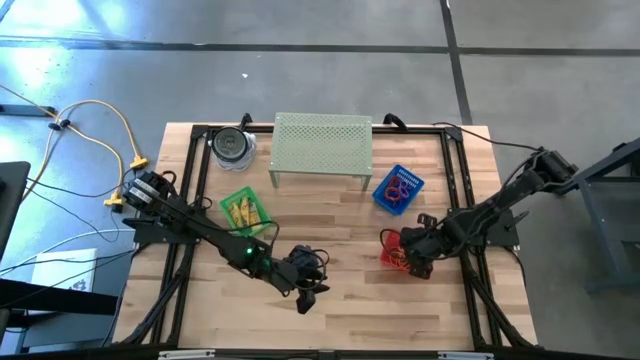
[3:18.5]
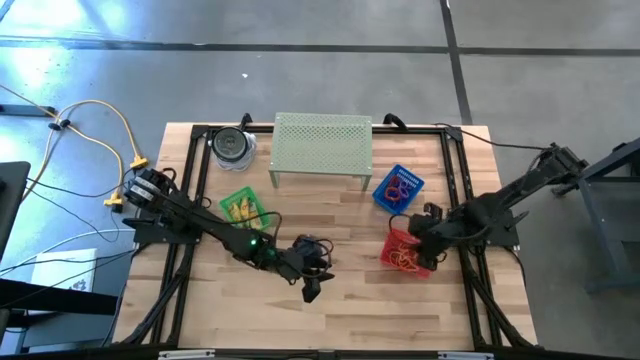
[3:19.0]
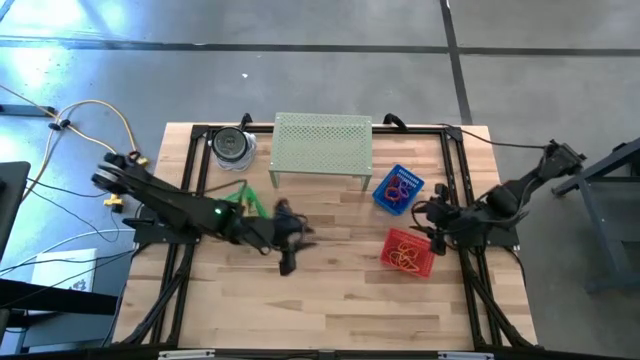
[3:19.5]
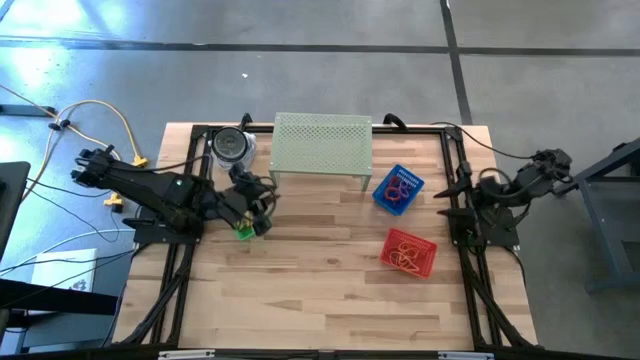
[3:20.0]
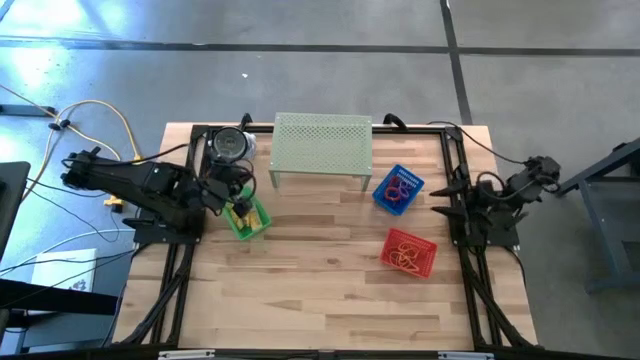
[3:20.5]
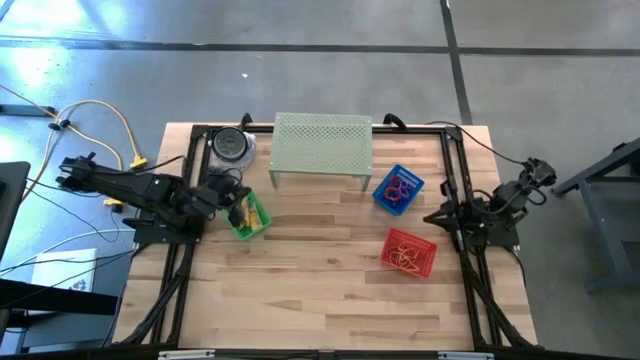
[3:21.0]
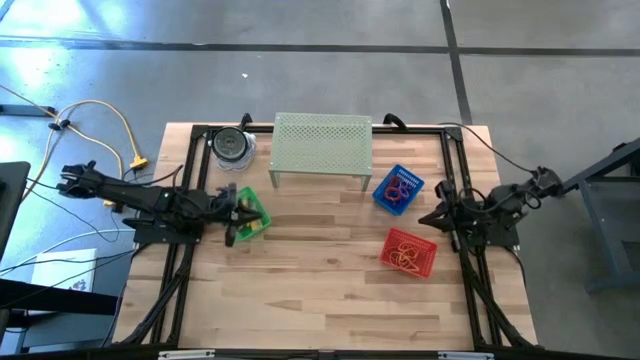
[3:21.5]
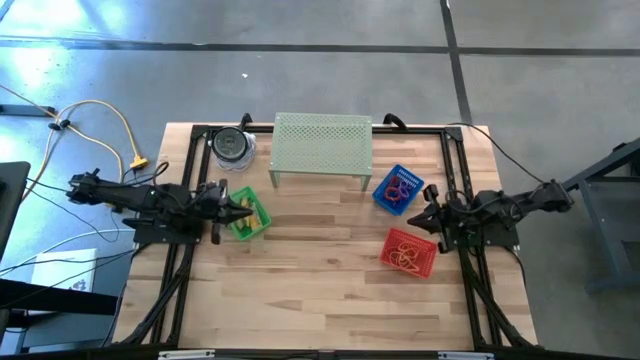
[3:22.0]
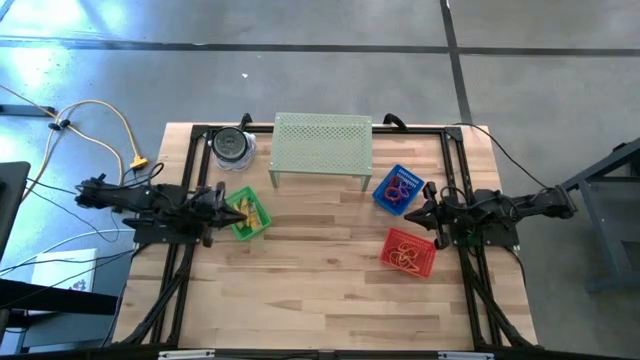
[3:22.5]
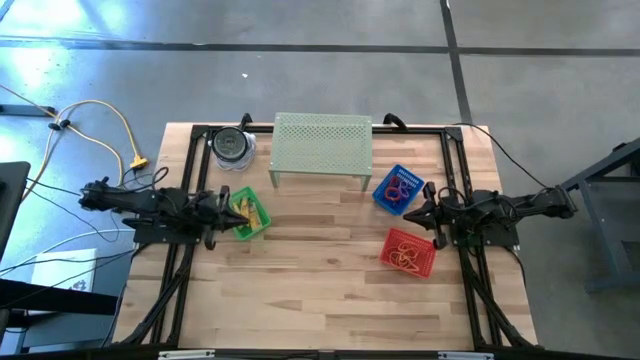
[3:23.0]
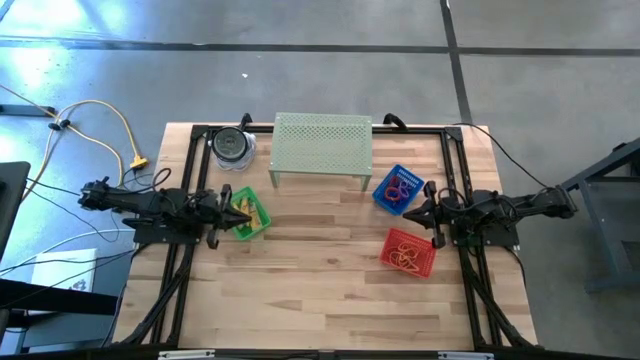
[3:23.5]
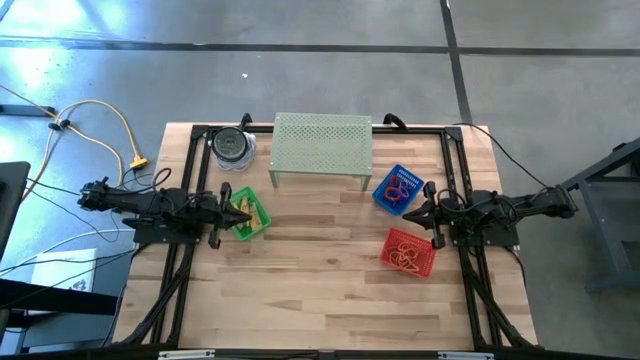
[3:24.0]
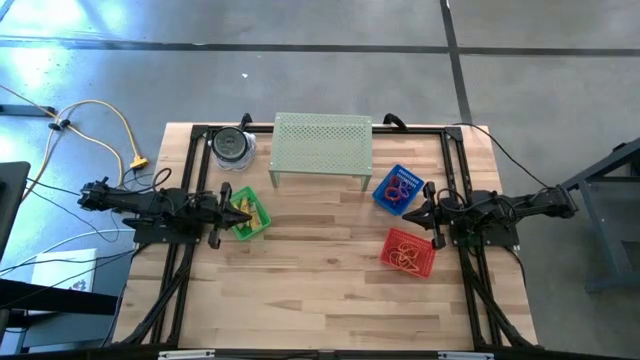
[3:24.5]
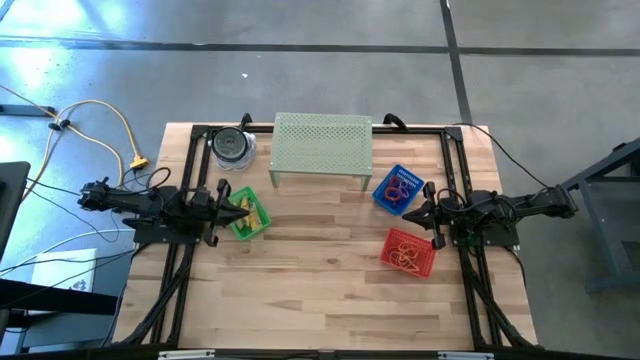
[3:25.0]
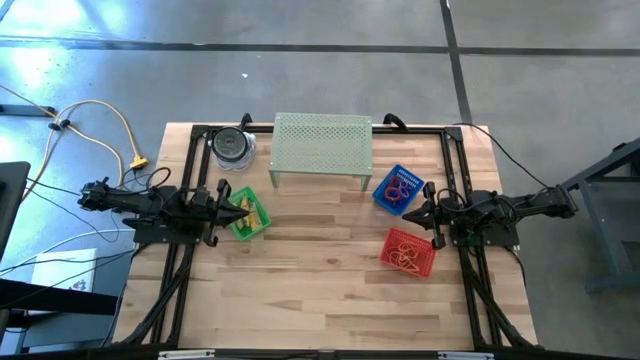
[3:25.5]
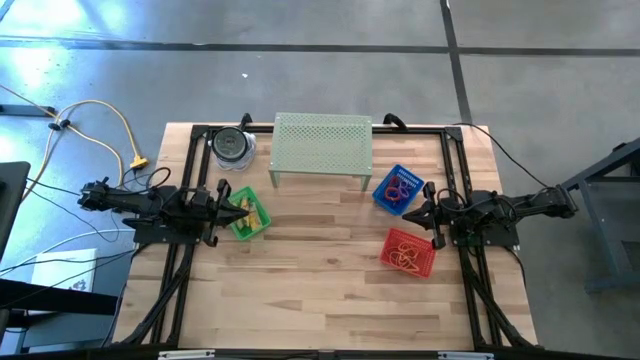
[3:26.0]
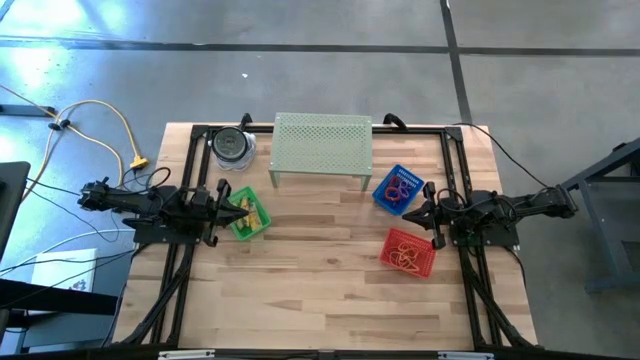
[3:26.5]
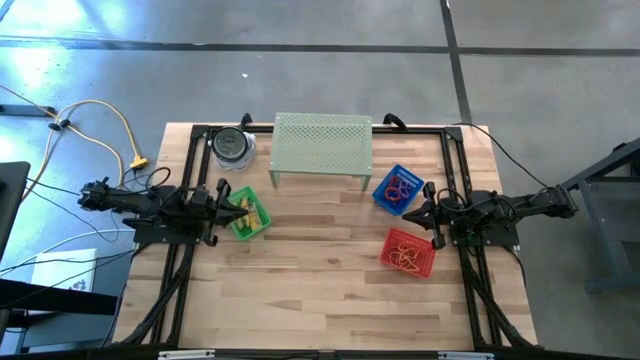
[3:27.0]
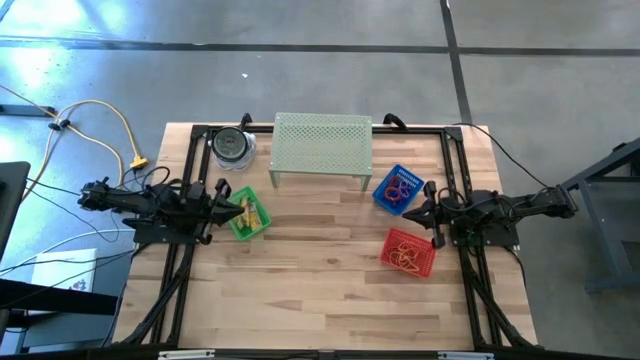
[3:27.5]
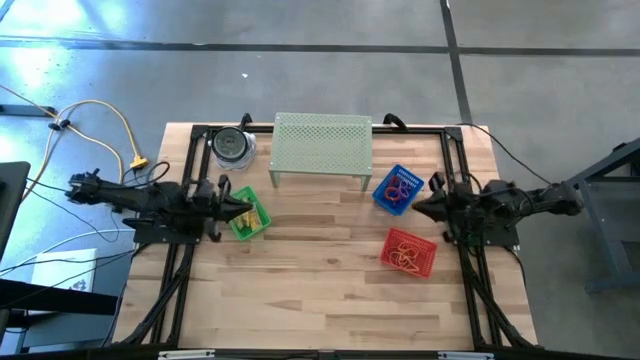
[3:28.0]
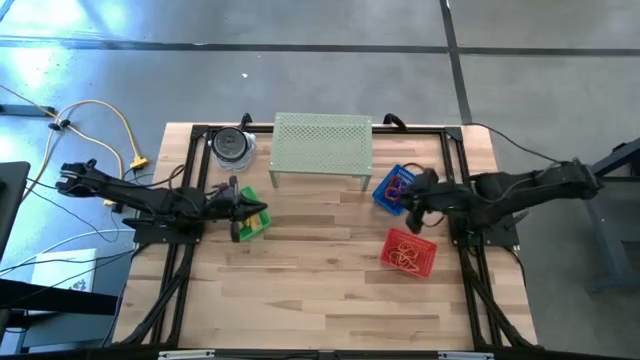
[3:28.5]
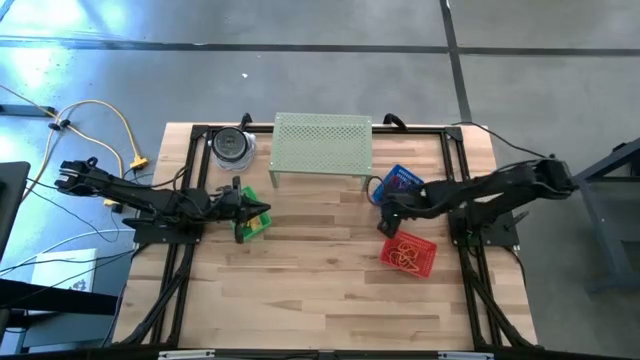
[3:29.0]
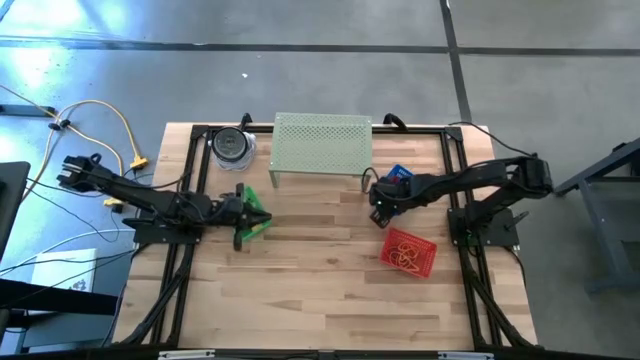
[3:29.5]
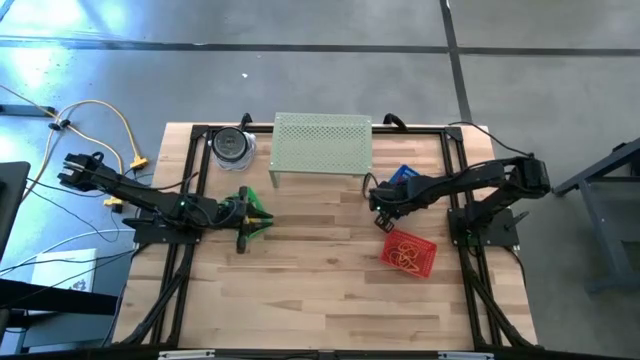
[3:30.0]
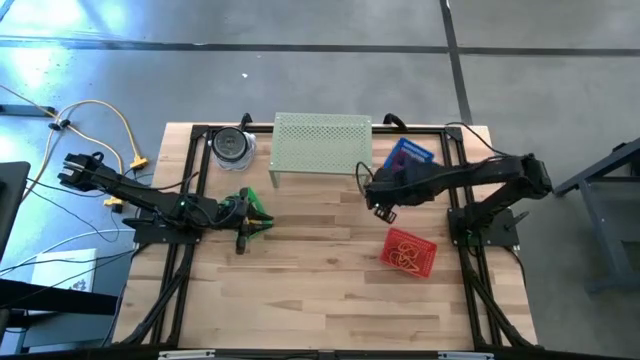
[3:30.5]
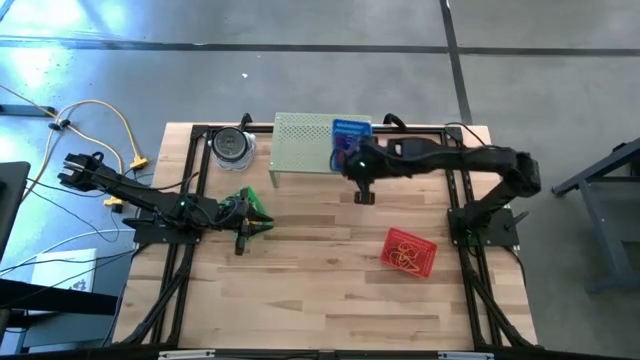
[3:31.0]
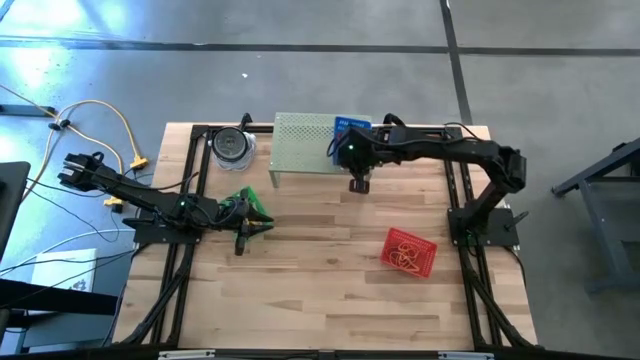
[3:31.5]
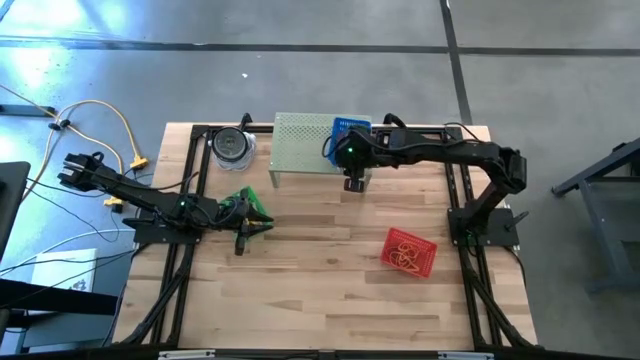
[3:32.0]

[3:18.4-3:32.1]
Task: Pick & Place Office Desk Supplies
Put the blue basket on the shelf

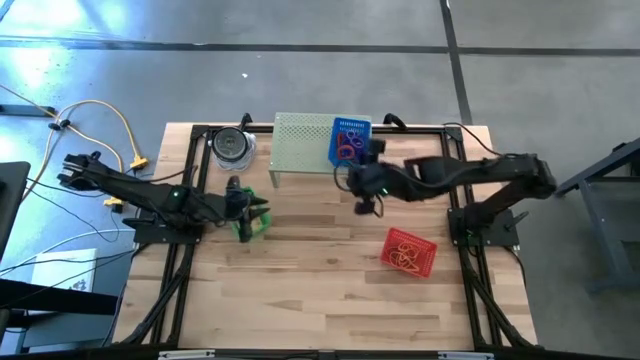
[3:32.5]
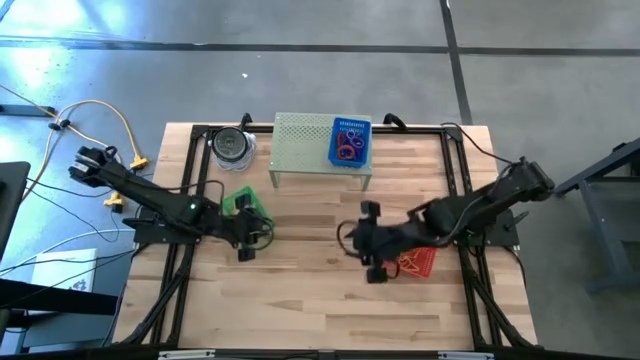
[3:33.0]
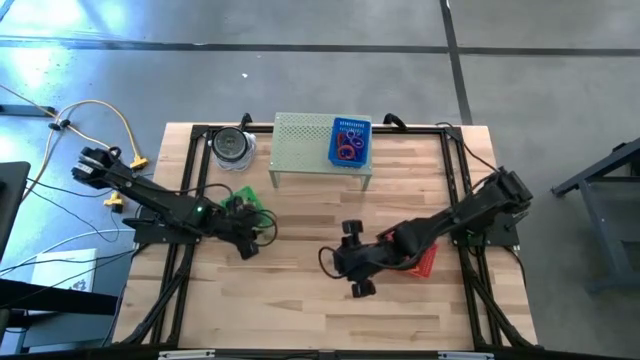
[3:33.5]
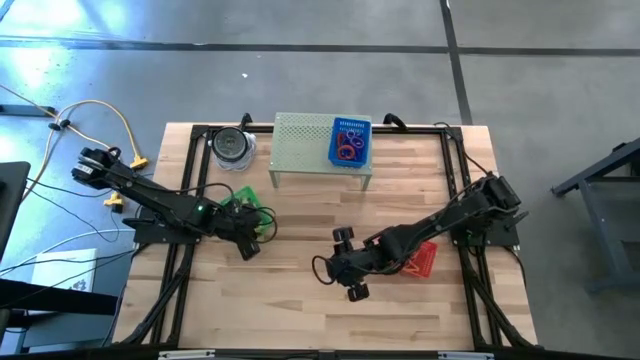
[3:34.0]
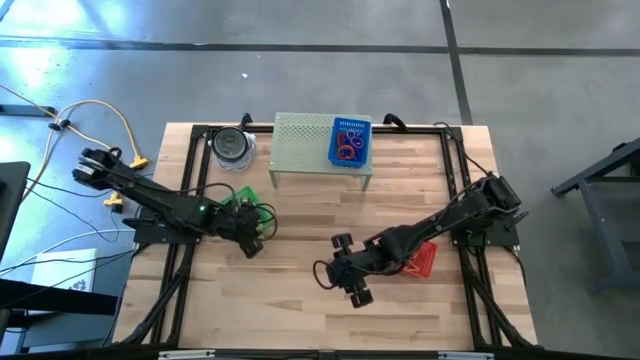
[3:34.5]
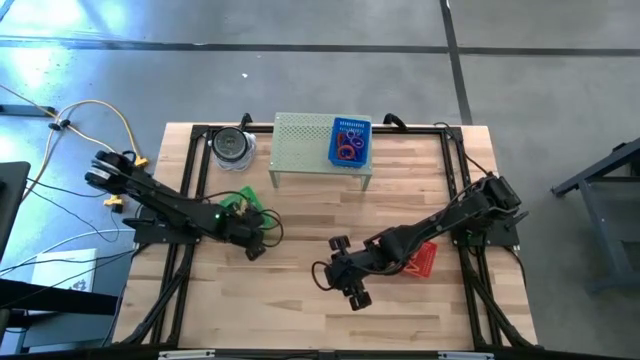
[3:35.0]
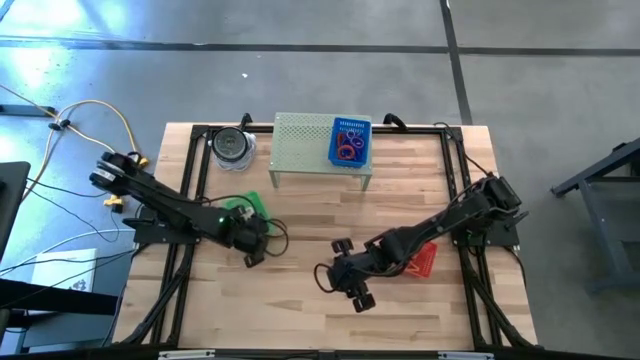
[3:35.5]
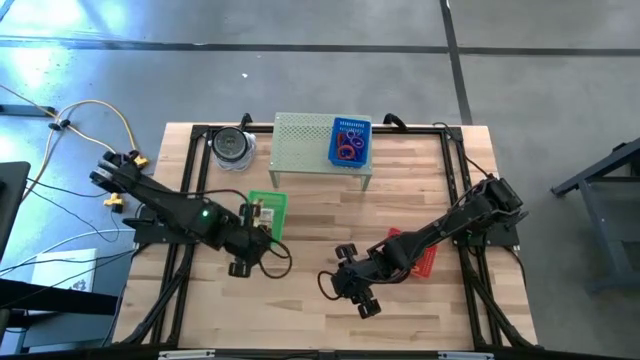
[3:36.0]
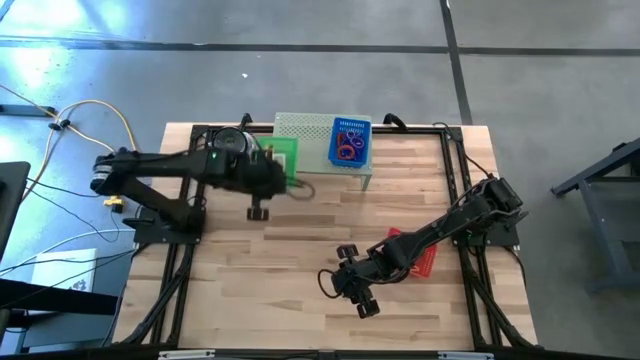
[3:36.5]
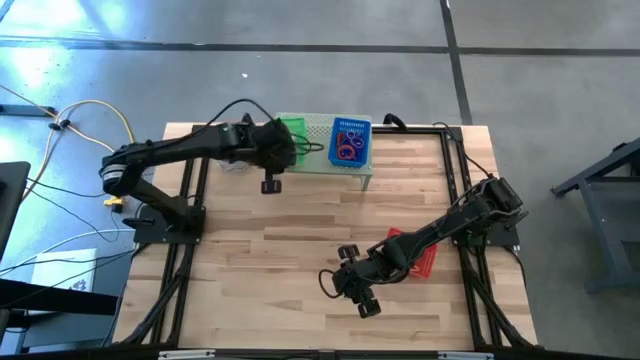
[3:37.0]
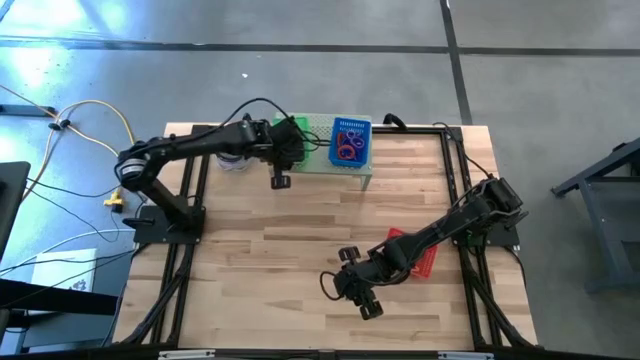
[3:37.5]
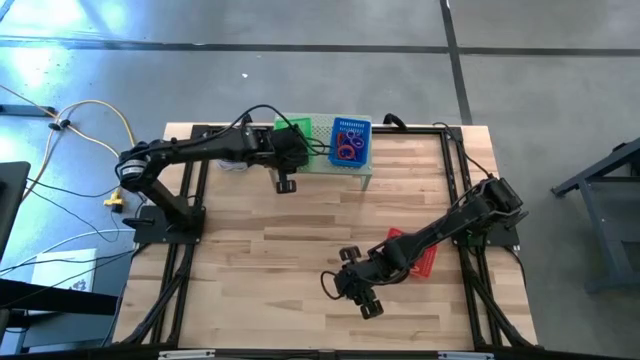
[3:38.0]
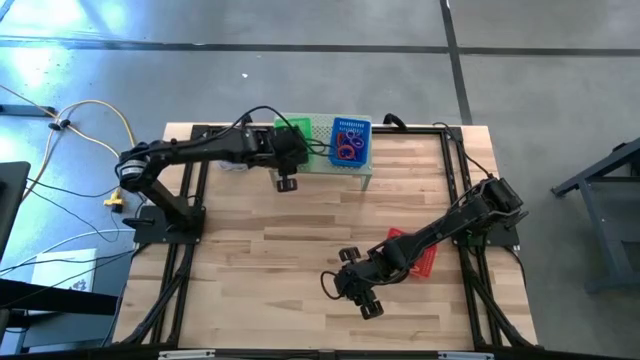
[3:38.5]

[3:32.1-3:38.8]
Put the green basket on the shelf

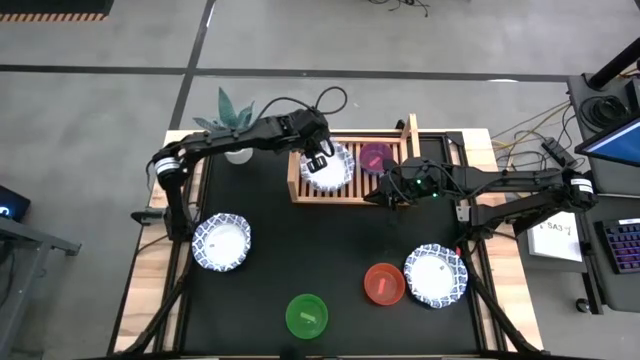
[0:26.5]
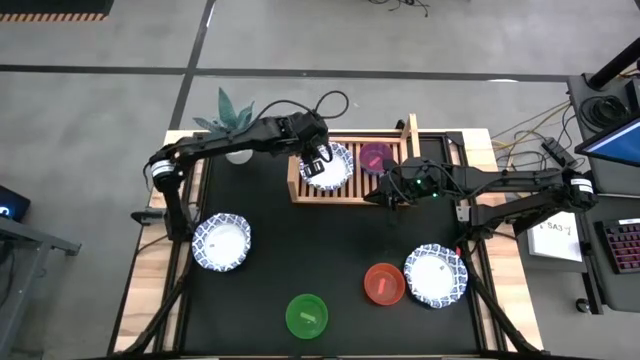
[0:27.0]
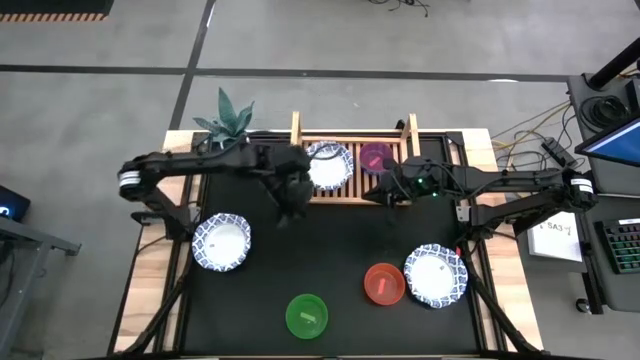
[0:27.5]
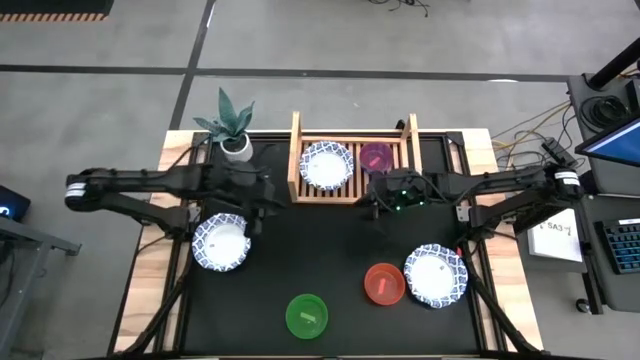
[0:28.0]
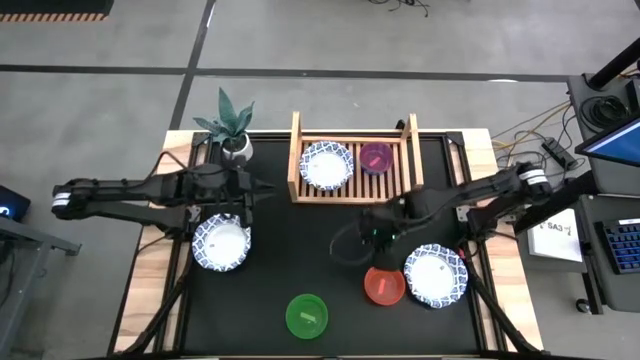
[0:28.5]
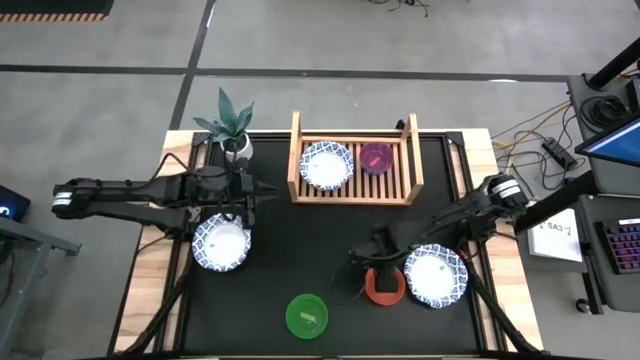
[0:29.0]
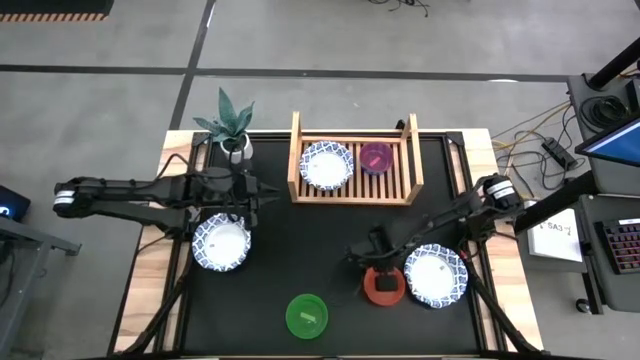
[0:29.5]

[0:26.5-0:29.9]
Task: Place and stack bowls onto a shelf
Stack the orange bowl on top of the pink bowl on the shelf
